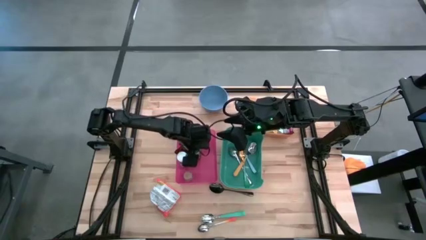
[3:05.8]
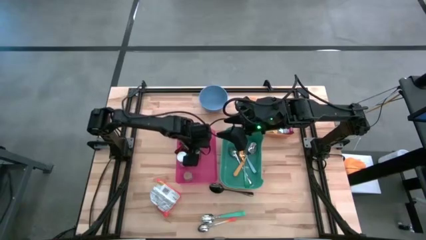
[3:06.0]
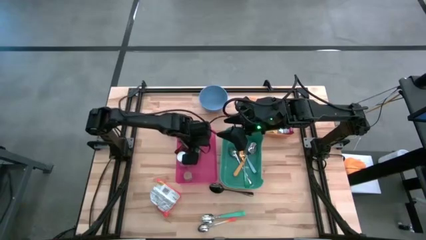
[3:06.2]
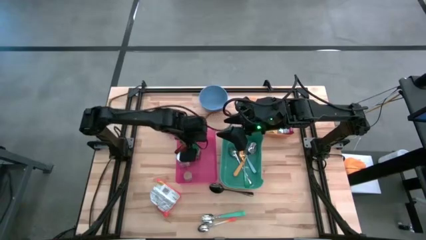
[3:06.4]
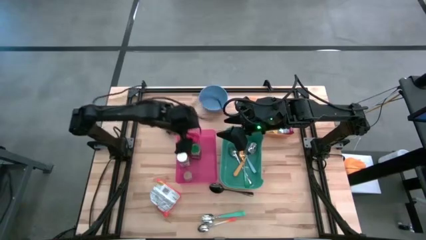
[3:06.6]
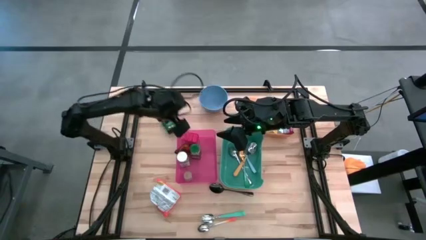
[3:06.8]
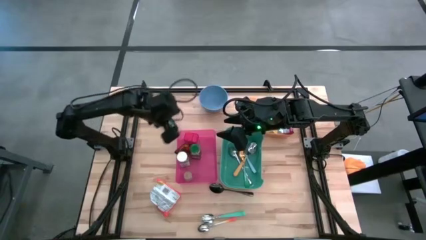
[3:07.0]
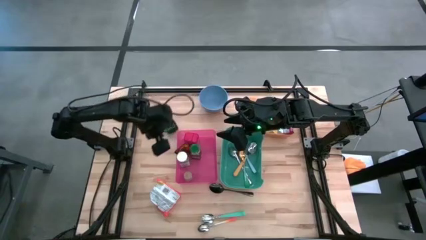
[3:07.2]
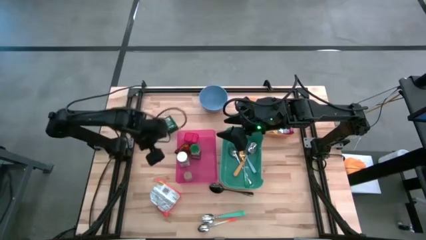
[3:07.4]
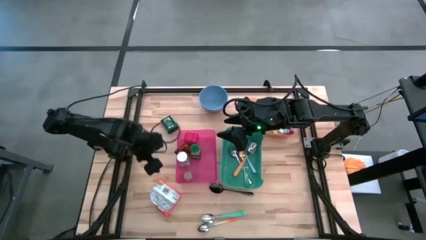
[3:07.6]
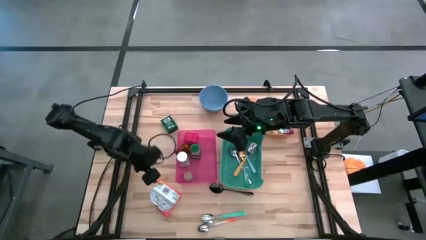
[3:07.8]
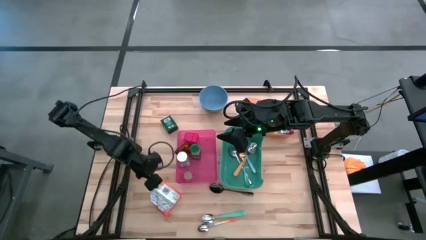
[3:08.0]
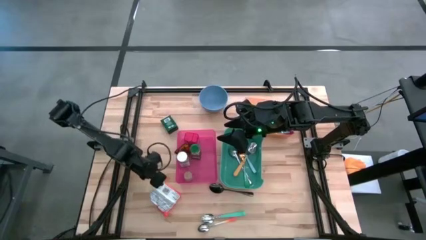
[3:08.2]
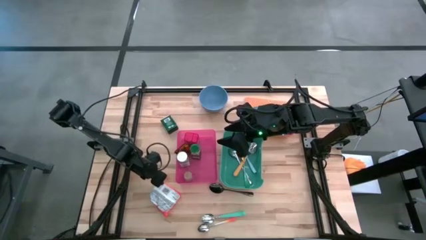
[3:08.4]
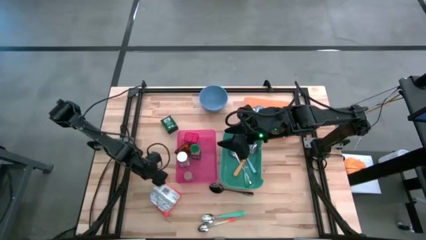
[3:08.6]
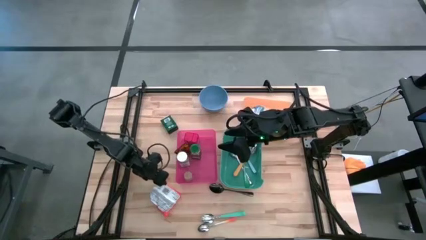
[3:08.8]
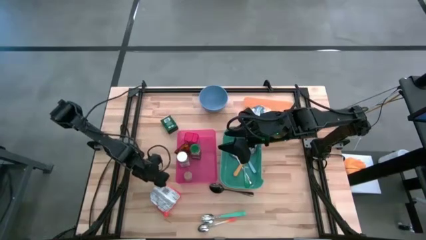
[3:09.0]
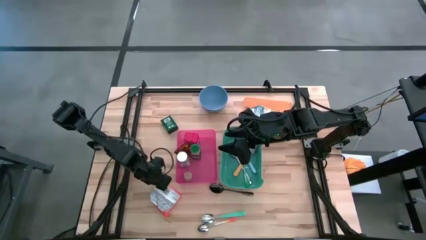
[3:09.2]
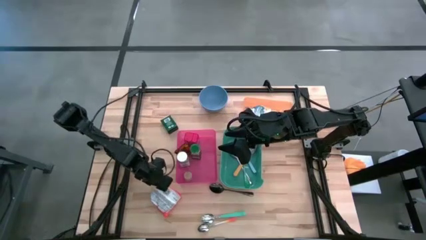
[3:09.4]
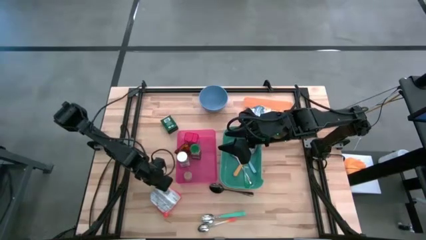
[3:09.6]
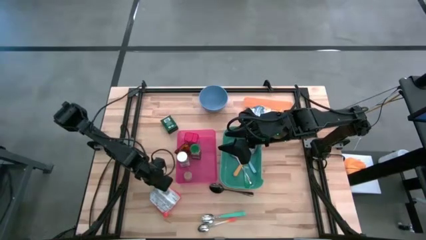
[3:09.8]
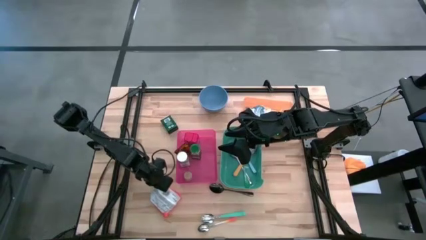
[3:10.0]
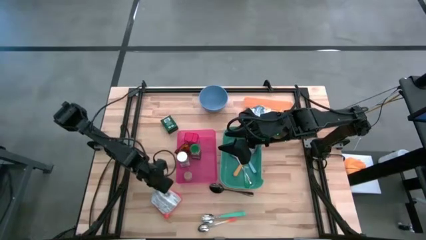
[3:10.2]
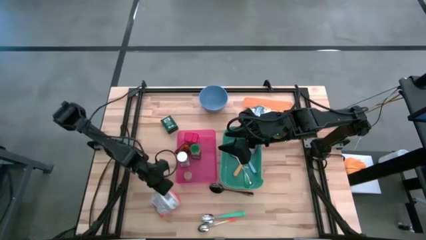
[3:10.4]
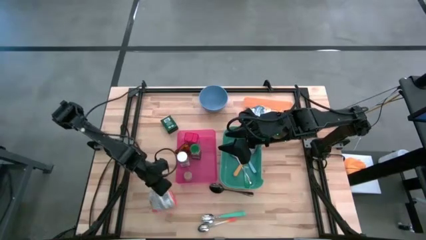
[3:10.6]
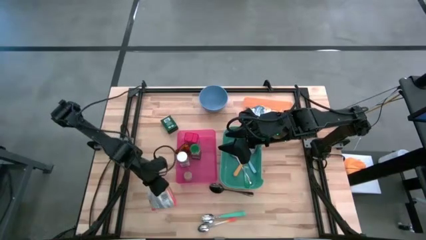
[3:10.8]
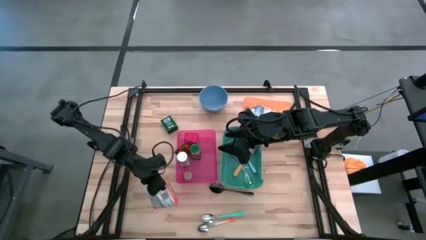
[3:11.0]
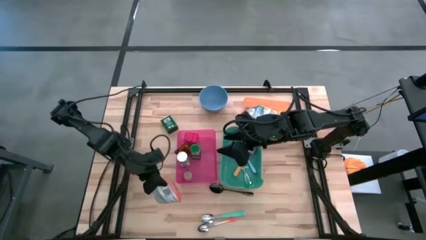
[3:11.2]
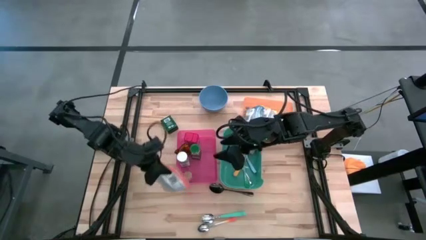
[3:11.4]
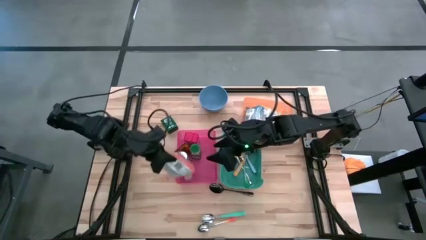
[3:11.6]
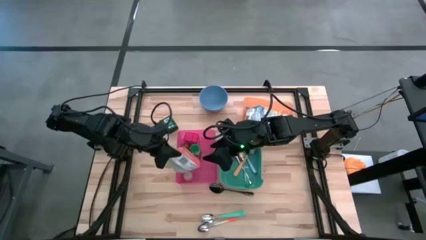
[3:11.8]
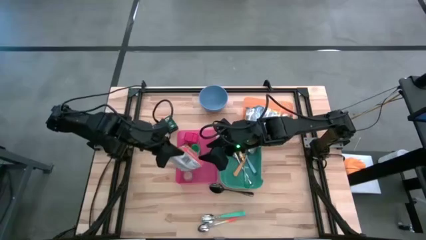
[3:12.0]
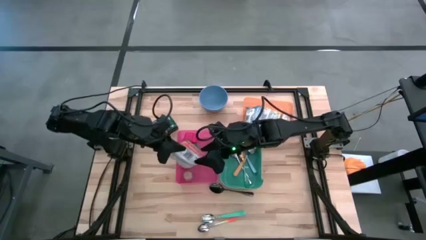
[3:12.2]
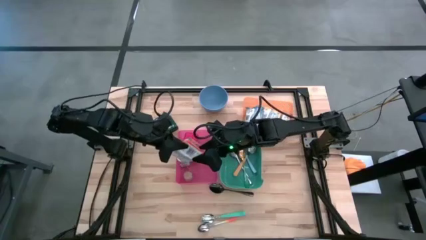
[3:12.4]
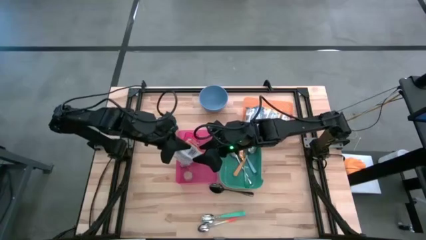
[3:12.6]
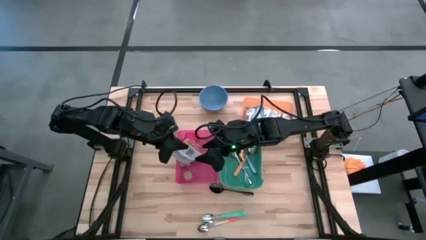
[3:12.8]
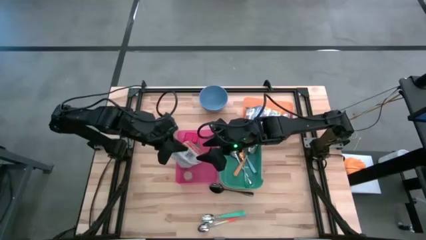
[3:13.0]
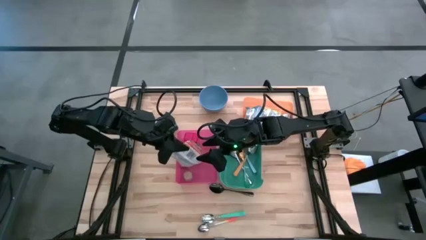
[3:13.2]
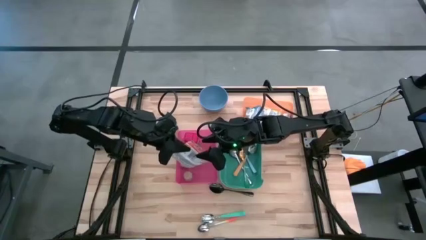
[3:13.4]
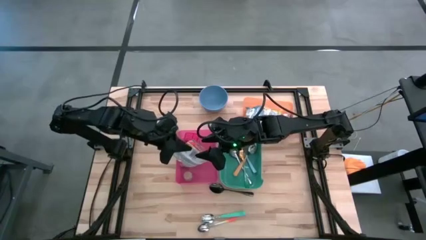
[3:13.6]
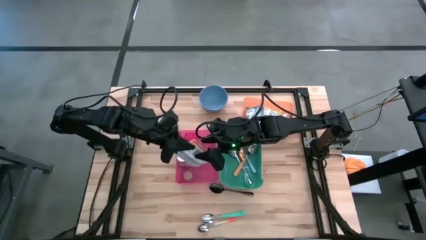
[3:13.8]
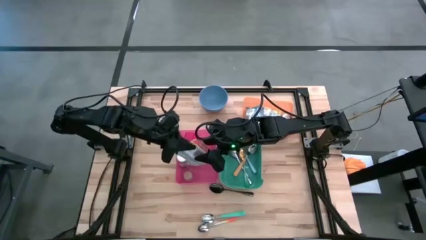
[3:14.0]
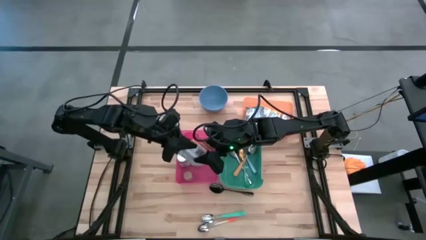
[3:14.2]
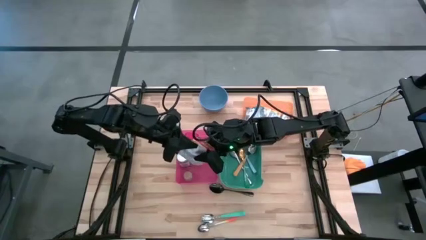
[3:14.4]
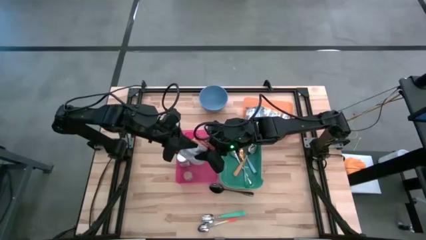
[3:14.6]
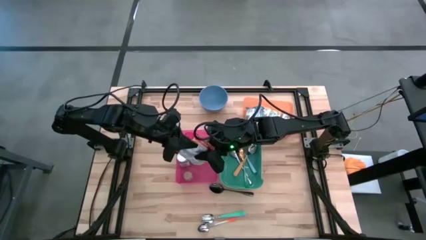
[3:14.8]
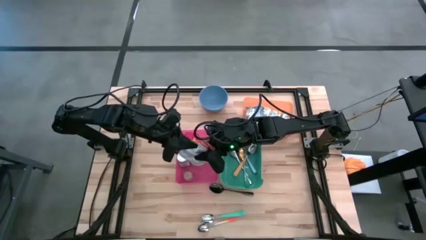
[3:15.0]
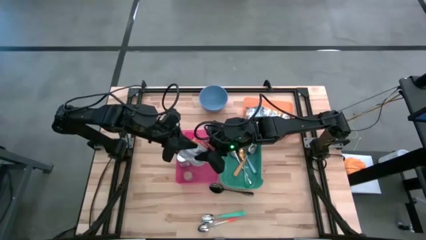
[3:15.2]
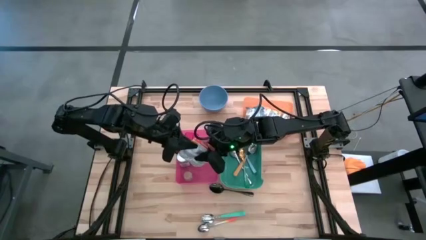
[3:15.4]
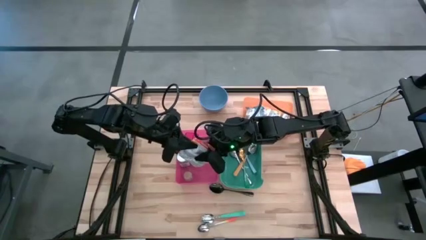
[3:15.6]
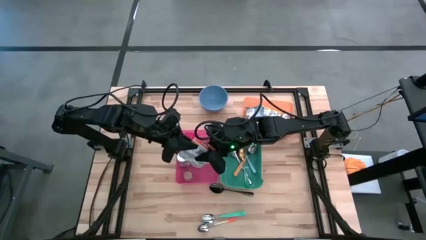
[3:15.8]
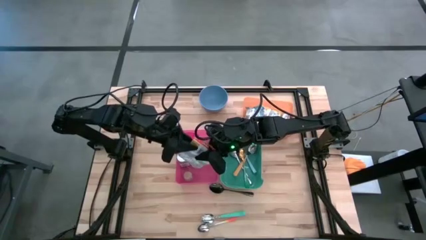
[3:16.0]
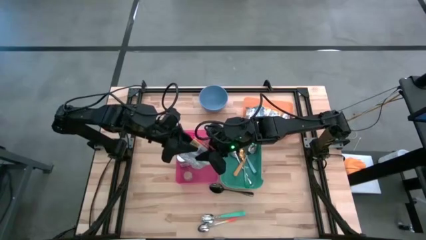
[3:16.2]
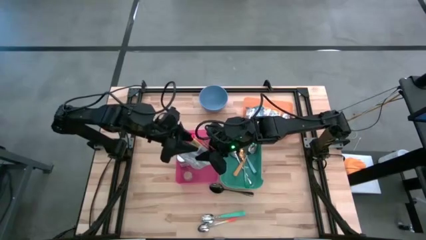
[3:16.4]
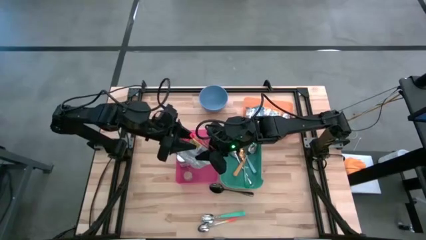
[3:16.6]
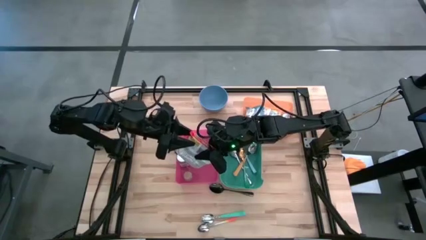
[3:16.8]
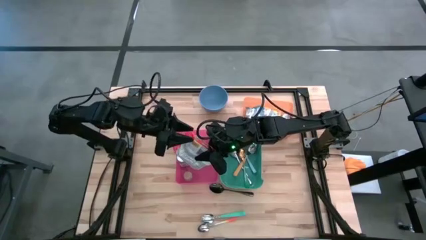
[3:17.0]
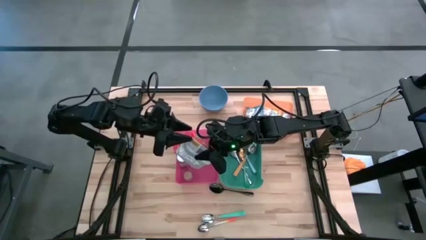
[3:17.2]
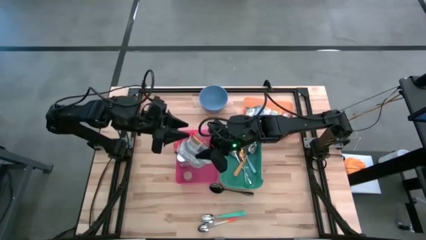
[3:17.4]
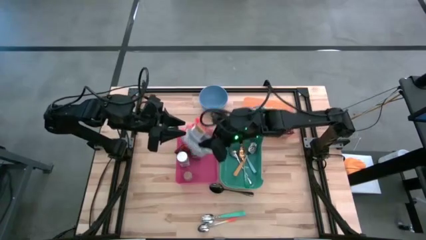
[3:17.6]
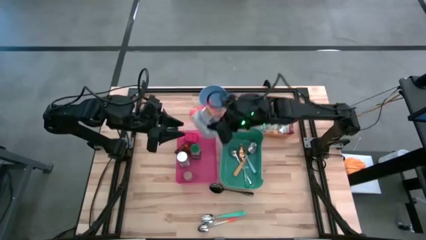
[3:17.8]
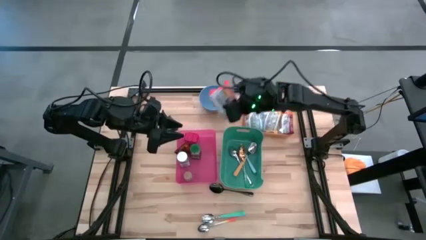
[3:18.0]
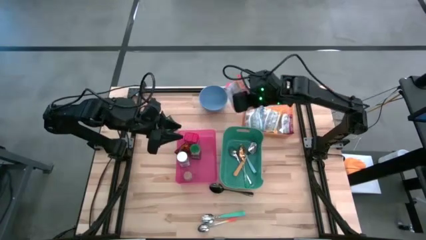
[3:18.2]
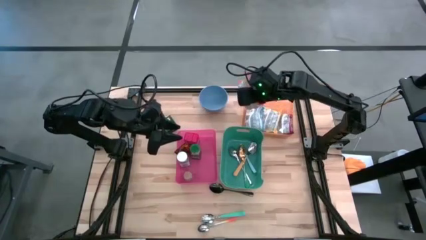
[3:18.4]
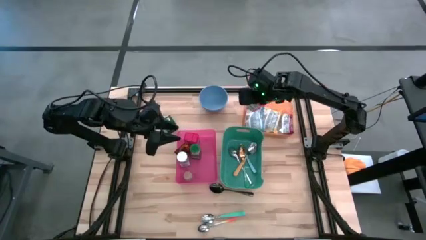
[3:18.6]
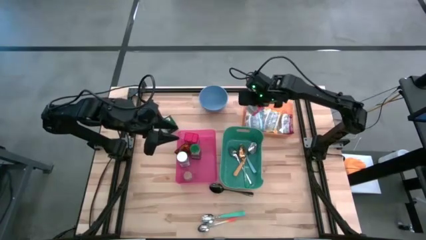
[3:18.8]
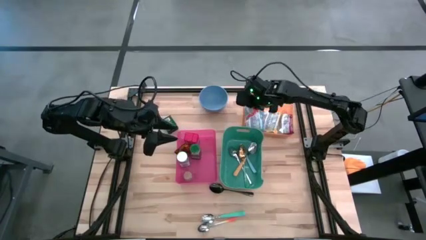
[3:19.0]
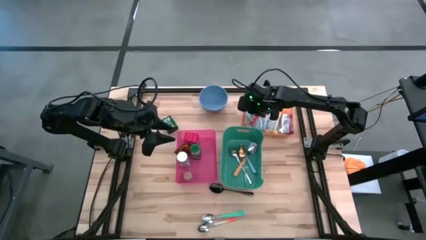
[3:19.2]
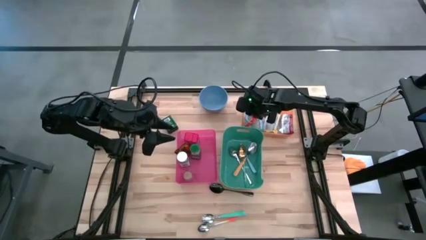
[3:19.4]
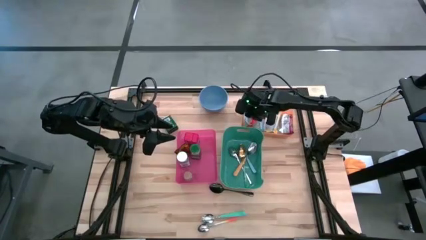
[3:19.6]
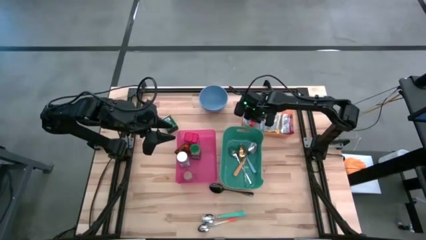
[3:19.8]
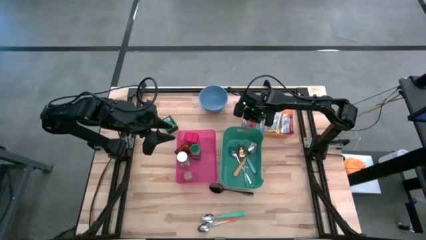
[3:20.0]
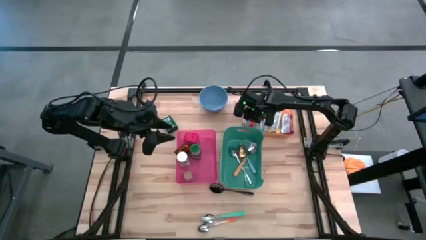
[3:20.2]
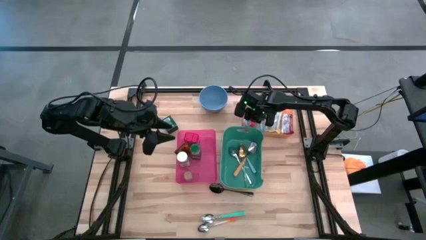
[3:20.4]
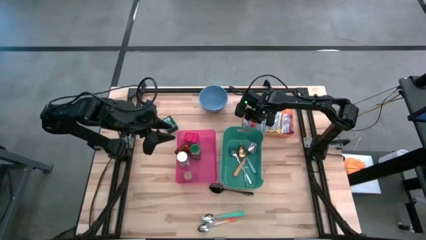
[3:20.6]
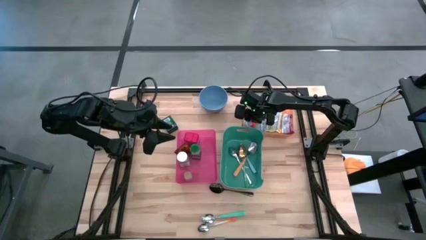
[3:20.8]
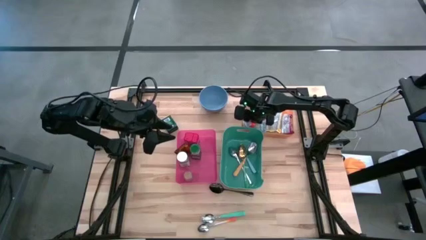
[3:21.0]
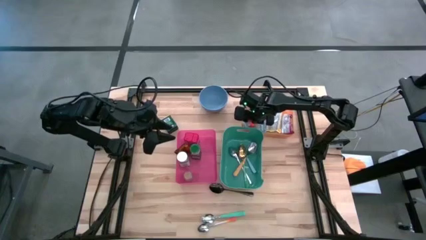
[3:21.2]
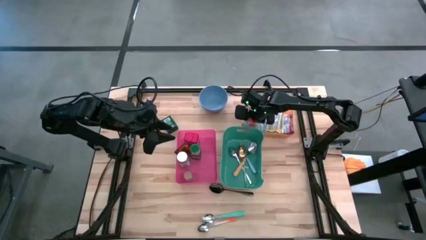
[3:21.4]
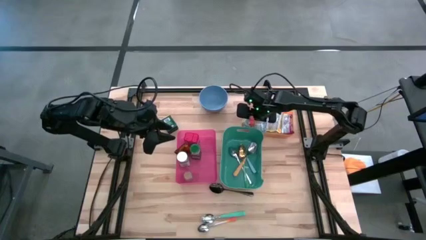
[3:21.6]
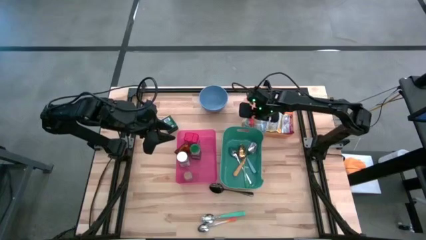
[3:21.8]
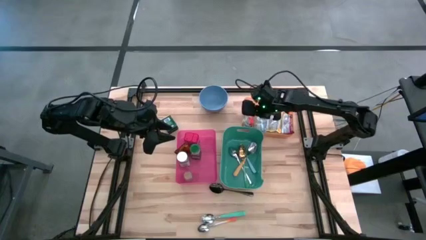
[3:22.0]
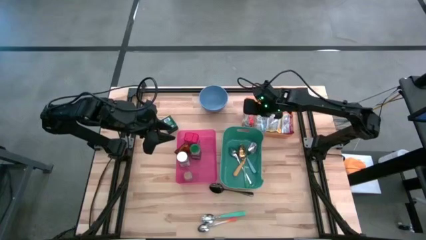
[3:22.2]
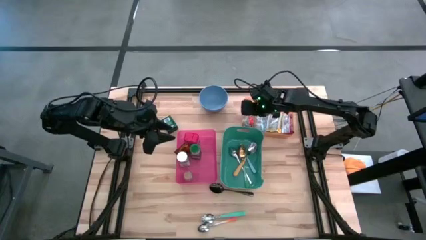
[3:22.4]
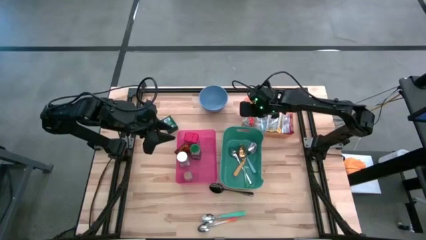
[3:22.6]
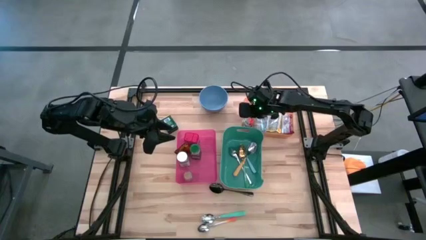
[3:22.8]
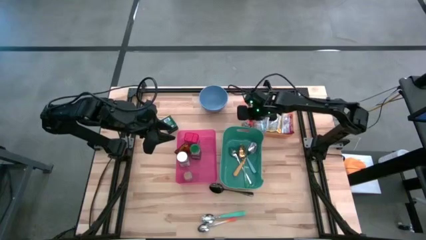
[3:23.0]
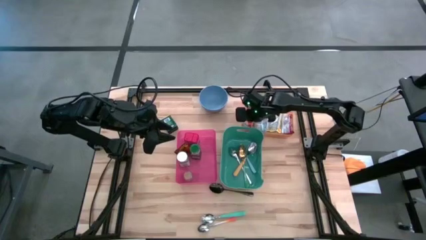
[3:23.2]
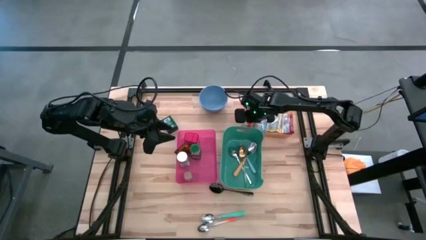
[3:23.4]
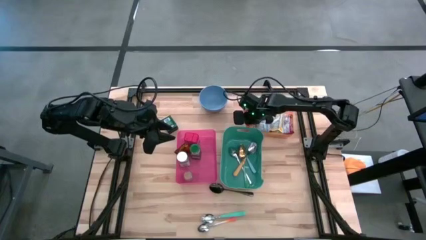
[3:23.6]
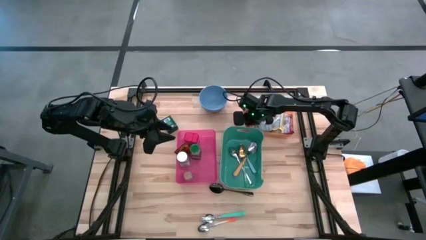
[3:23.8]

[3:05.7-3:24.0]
Put the orange noodle pack into the orange bin
